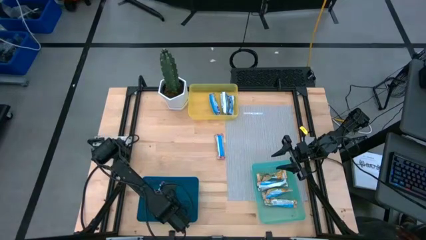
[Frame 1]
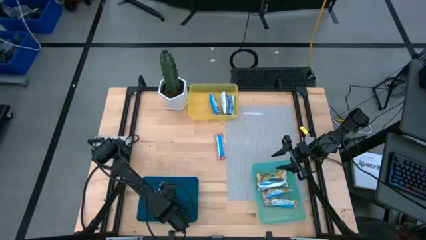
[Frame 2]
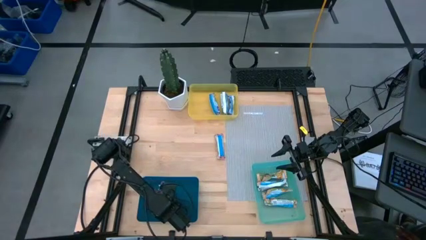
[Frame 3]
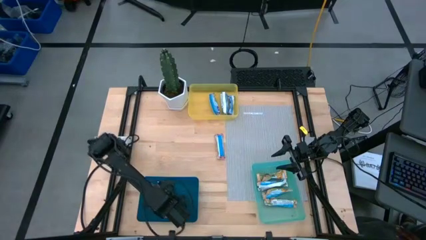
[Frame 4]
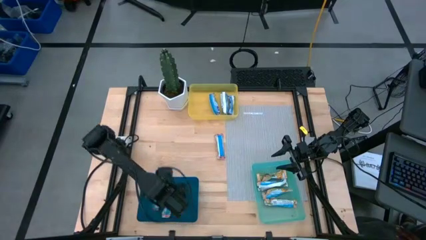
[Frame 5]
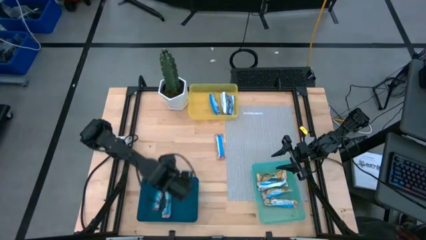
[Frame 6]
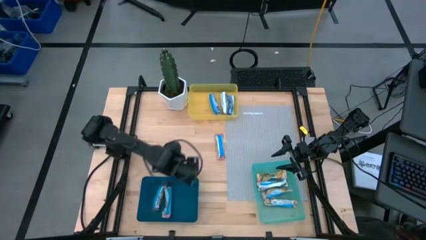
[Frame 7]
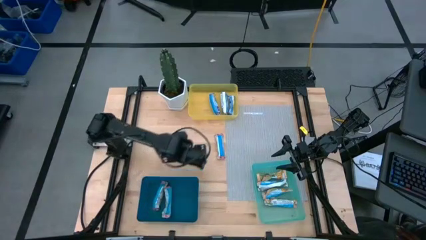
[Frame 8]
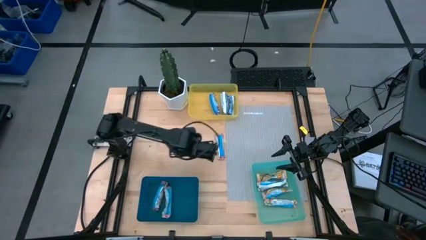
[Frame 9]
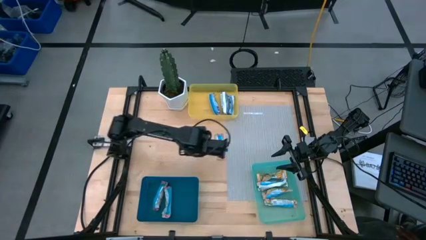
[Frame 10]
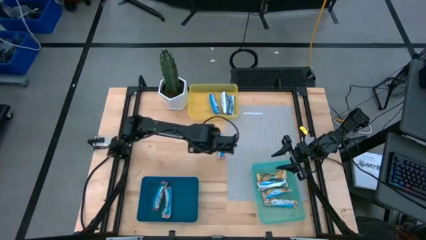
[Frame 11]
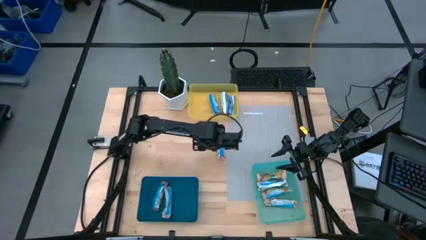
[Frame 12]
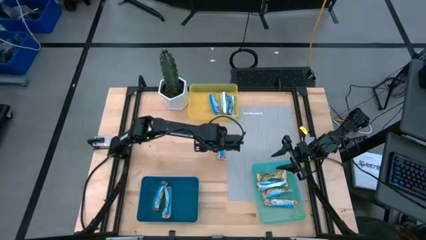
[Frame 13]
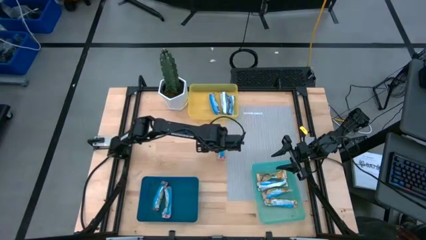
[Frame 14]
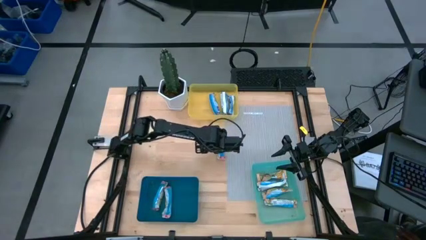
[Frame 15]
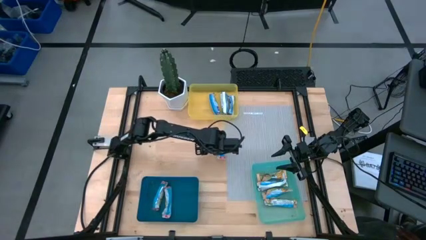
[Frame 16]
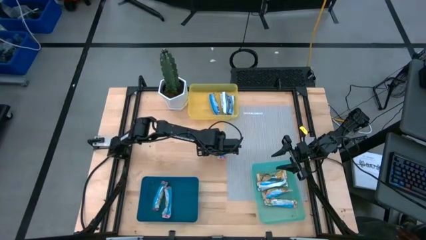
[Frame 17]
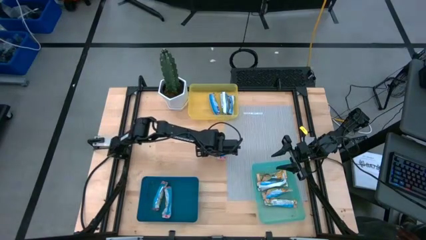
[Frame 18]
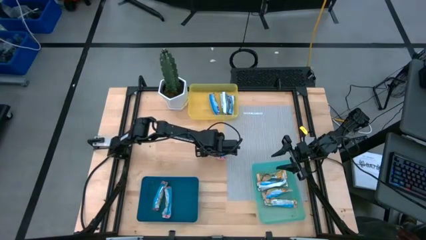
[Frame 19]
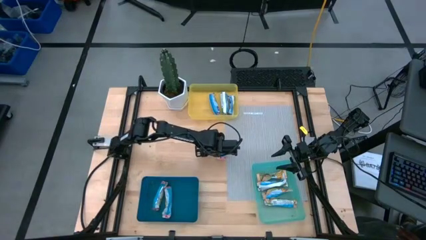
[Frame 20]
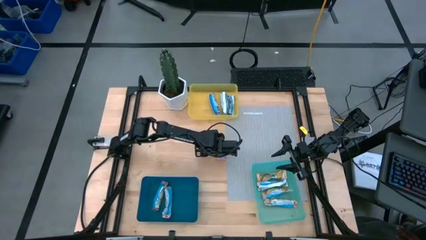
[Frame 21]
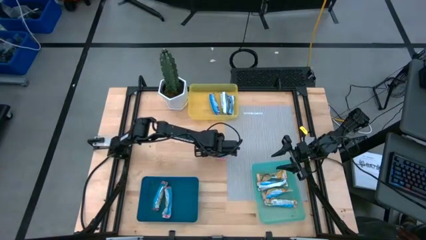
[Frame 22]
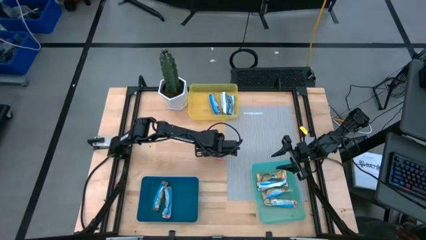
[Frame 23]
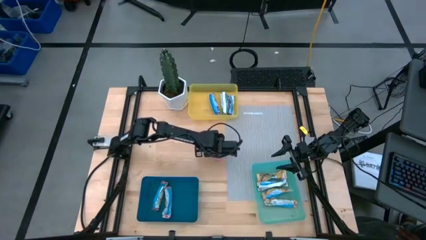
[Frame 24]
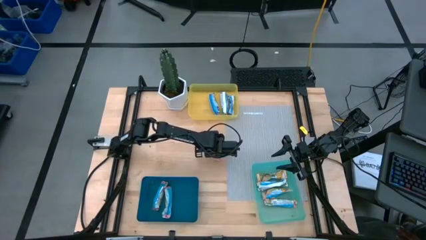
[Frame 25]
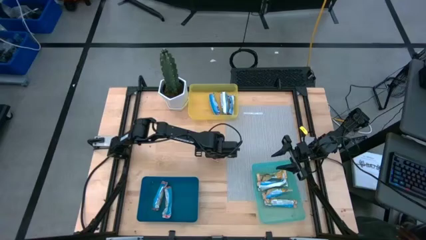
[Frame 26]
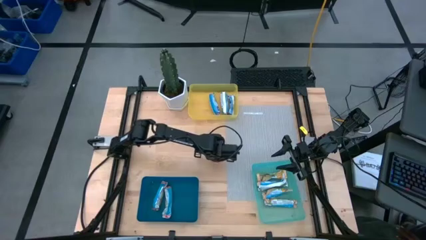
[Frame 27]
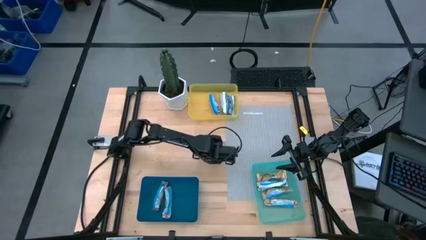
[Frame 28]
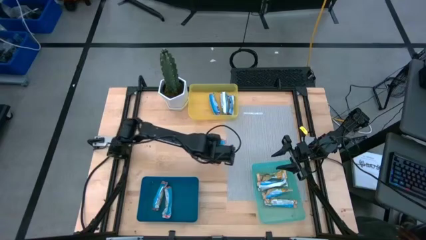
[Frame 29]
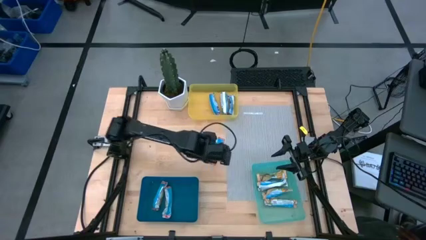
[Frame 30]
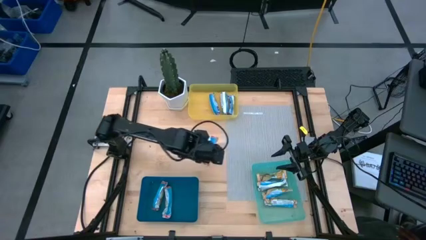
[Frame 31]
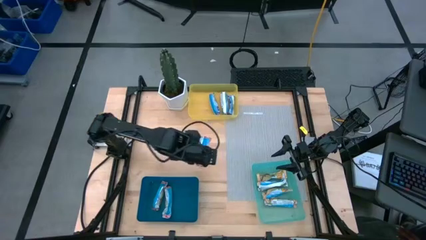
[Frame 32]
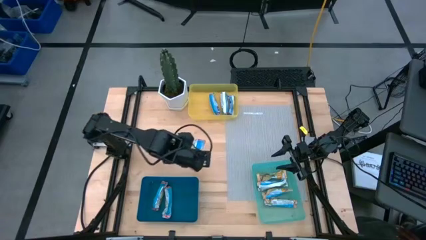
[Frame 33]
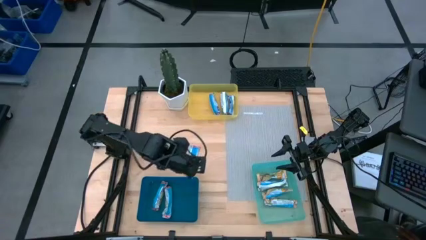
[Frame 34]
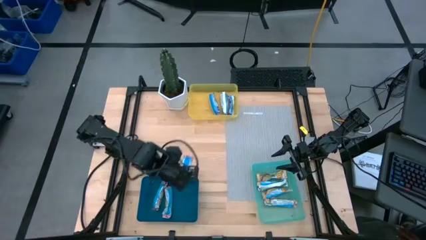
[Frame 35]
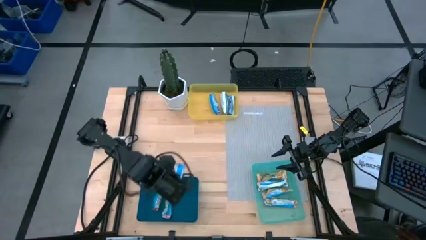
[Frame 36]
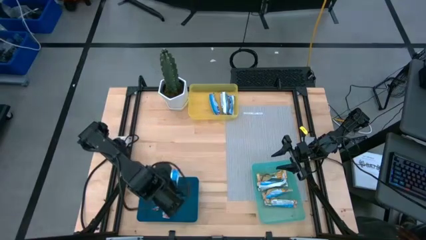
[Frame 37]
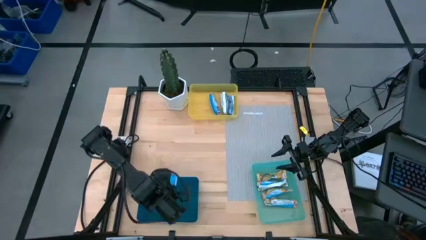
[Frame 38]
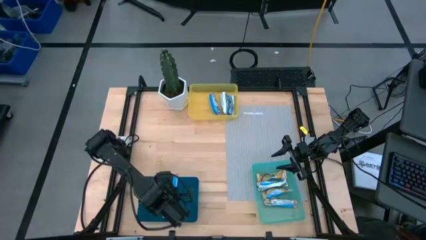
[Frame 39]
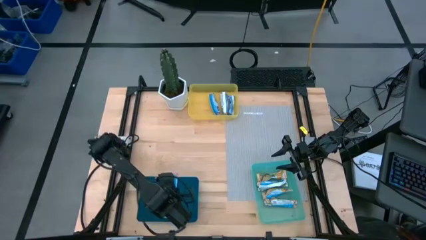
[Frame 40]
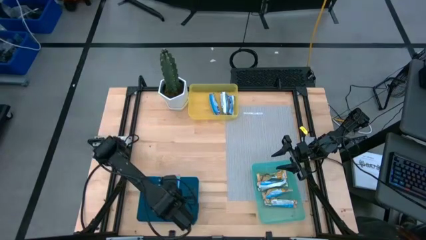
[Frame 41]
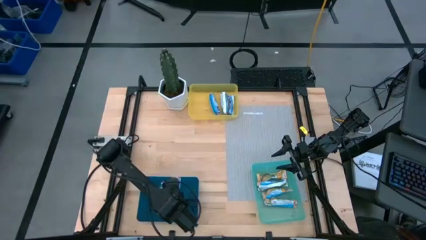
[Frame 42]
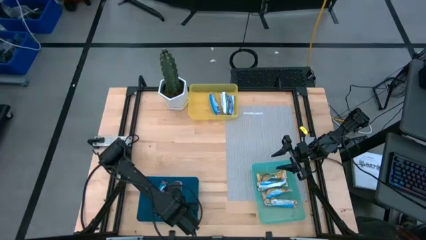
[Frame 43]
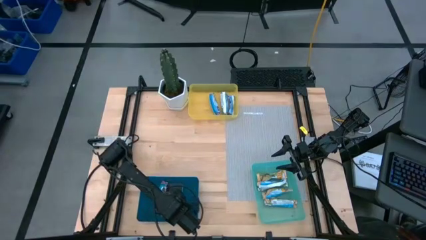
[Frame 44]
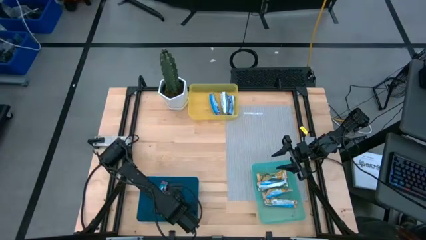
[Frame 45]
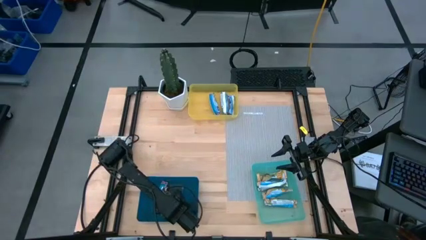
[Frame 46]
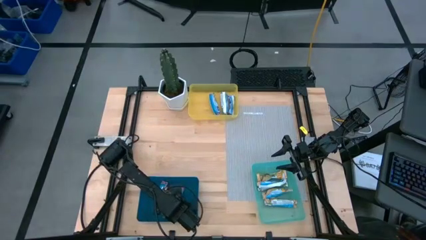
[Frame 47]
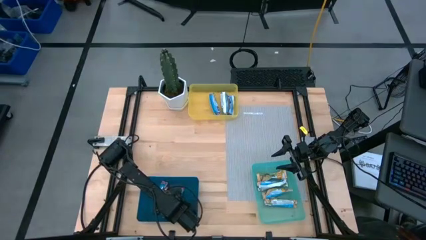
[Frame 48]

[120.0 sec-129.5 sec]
Task: Pick and place Granola Bars by type
Put the red granola bar into the blue bin

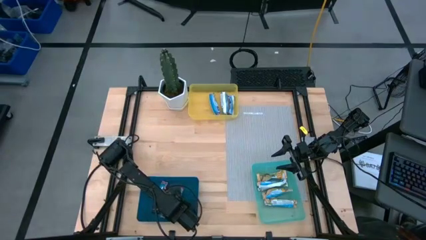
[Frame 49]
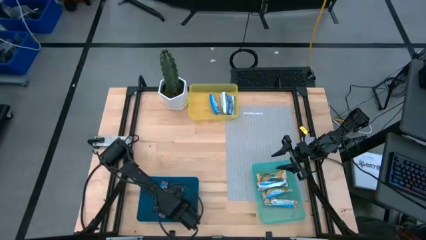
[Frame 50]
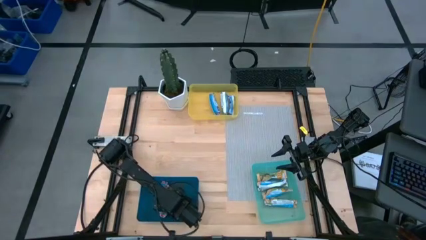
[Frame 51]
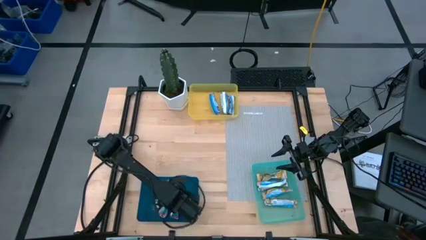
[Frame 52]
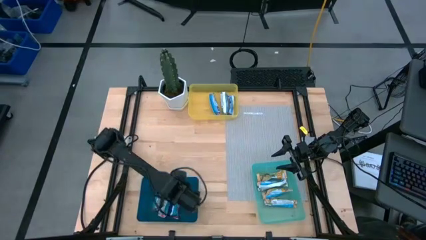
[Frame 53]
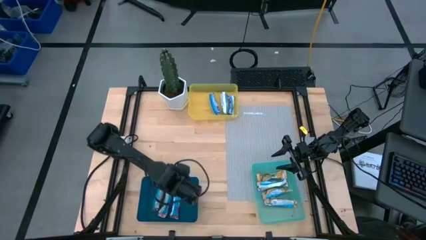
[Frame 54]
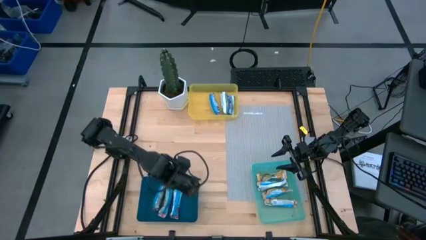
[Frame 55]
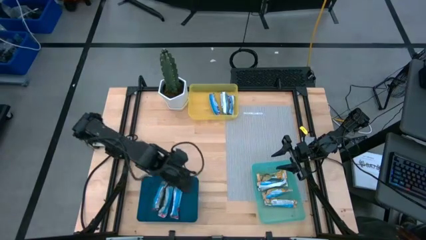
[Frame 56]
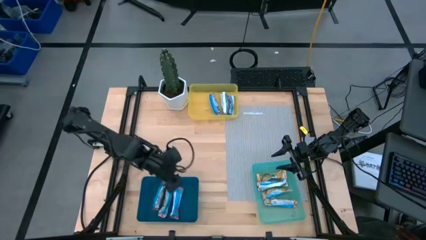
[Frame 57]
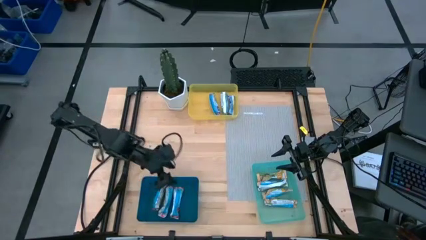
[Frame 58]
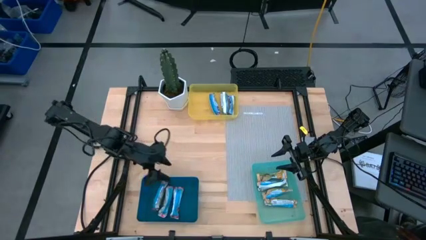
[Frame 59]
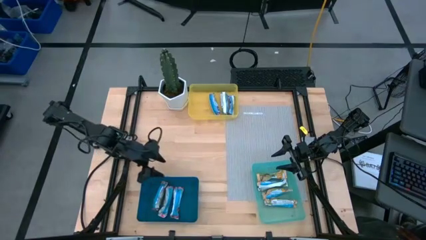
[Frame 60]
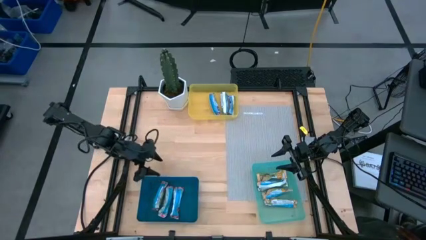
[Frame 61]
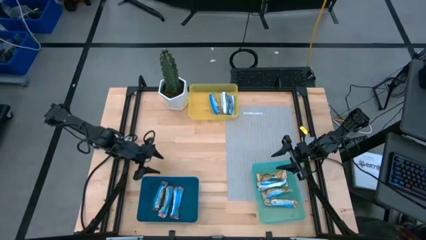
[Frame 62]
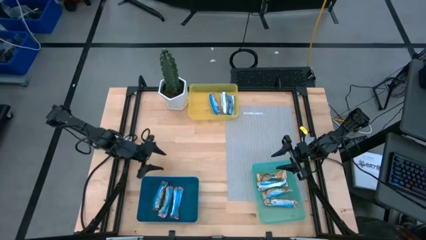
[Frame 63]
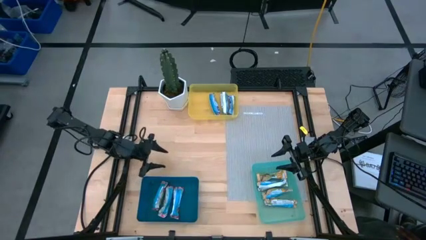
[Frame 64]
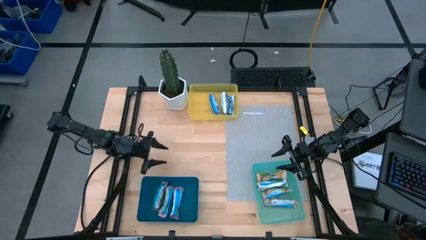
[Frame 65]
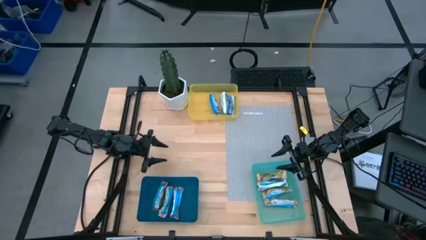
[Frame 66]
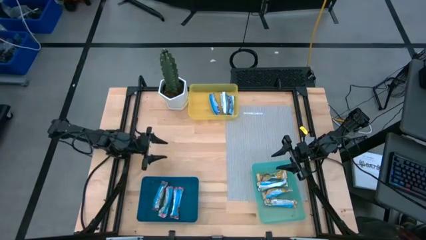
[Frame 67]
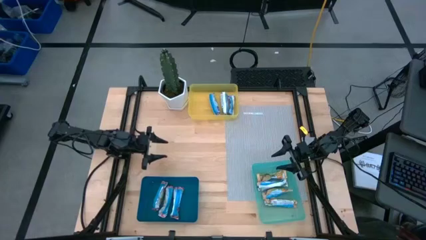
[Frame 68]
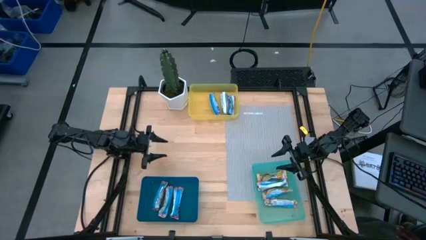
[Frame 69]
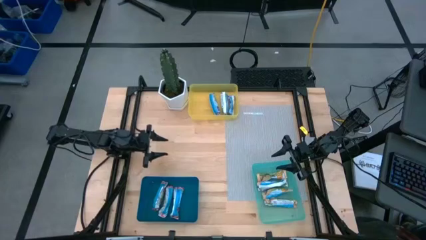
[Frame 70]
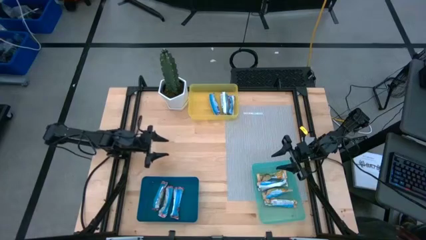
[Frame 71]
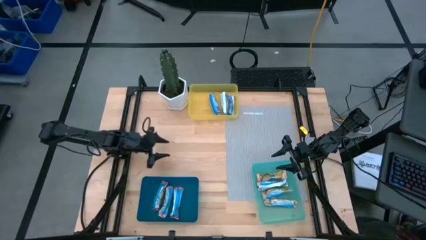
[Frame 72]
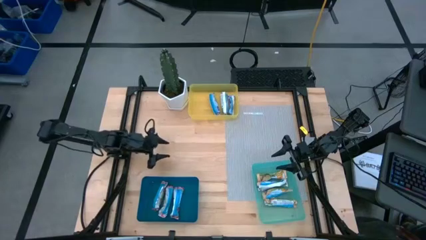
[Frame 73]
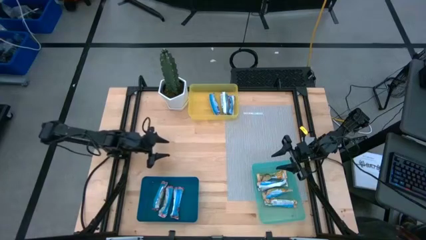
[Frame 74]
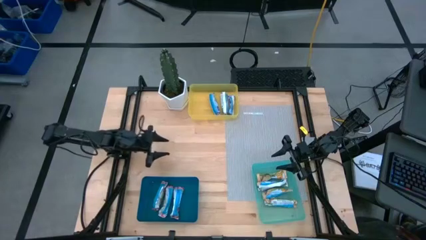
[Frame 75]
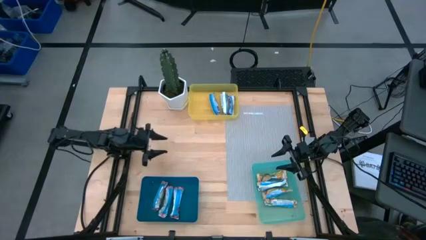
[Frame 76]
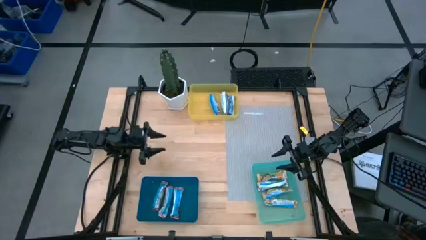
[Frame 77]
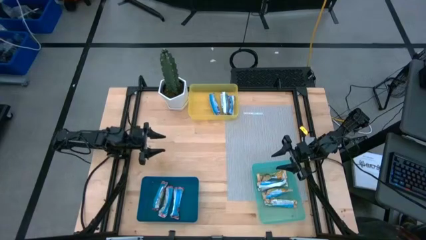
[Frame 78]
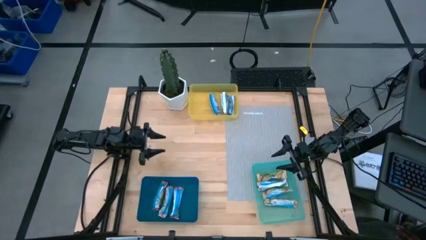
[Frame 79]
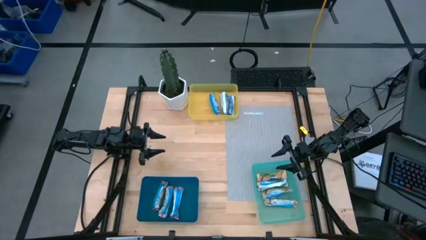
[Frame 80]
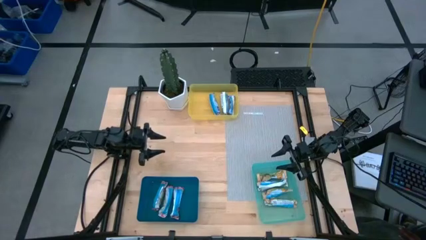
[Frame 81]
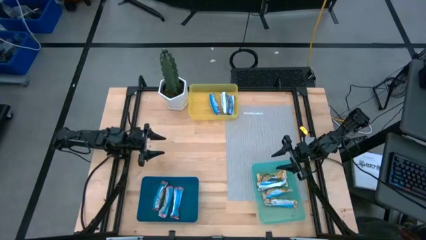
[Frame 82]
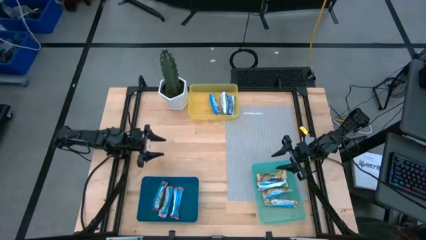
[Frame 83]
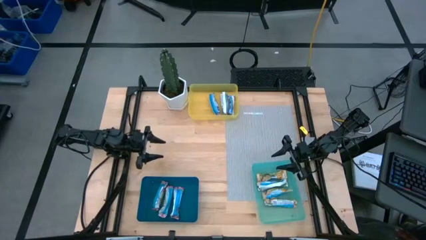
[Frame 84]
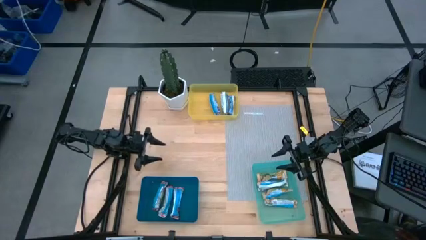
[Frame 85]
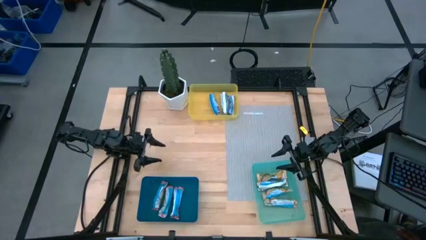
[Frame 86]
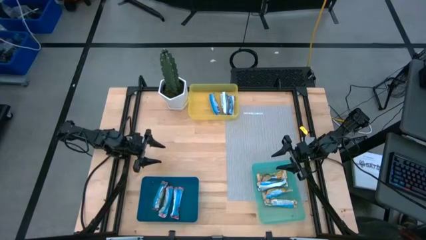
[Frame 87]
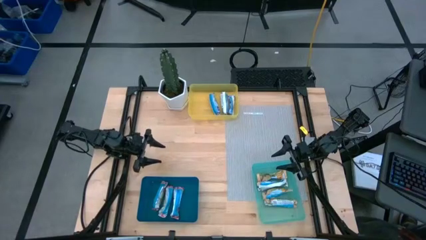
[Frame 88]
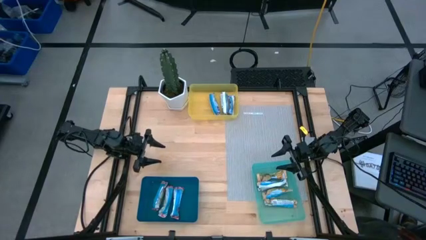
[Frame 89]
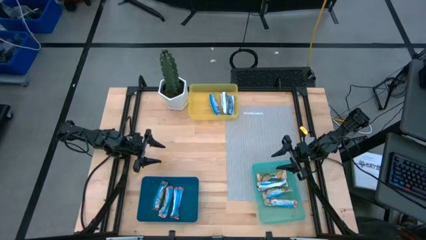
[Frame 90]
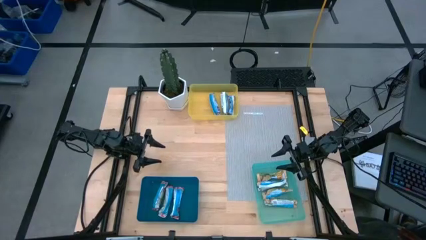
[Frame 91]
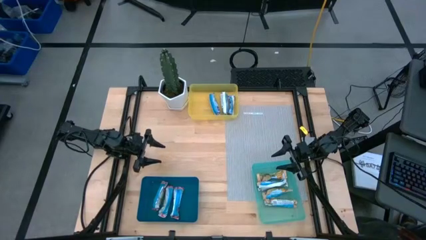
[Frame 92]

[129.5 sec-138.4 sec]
Return to Home Position
